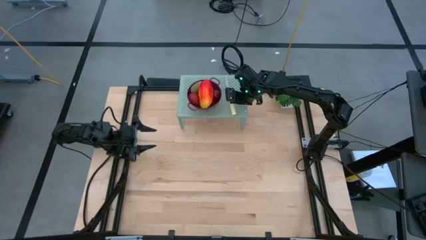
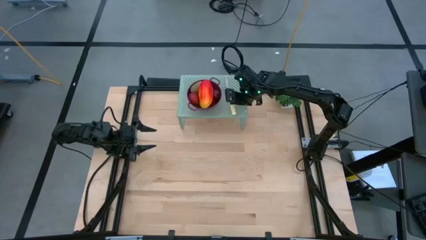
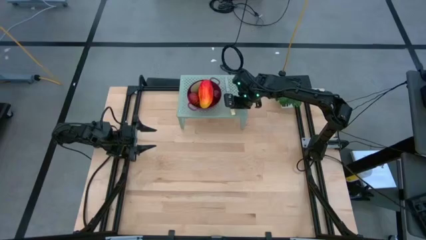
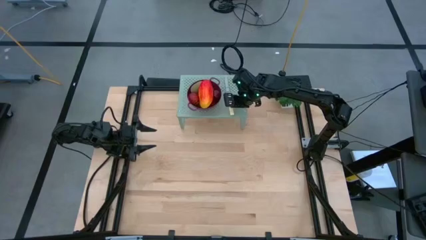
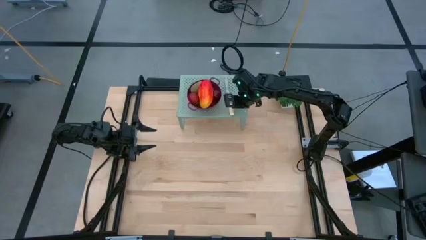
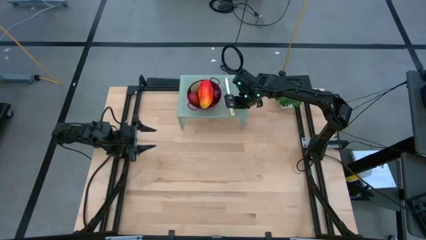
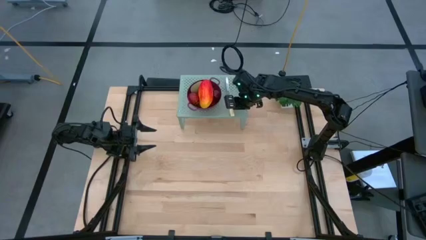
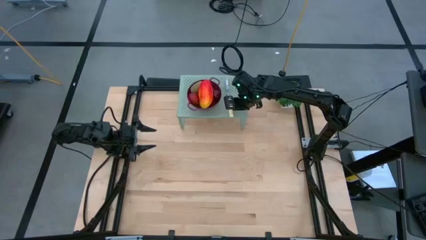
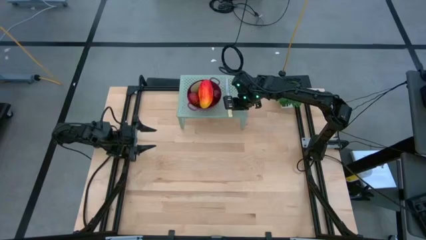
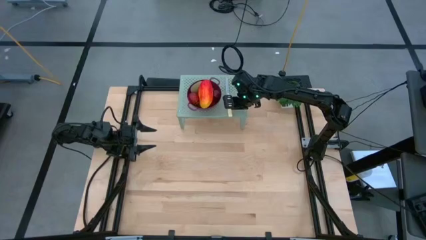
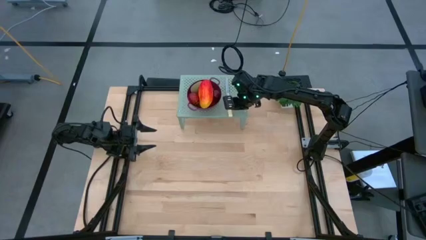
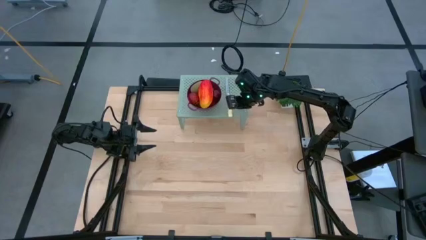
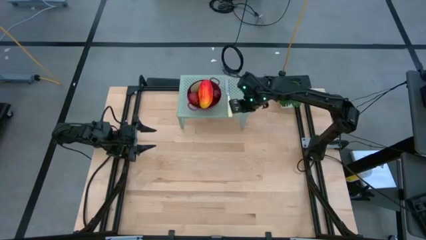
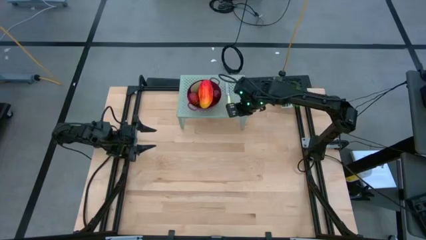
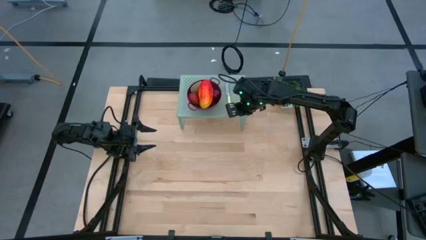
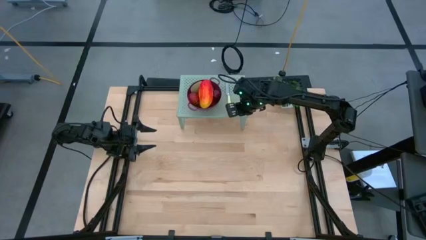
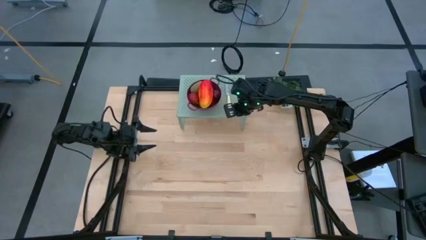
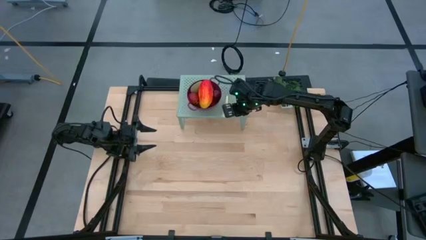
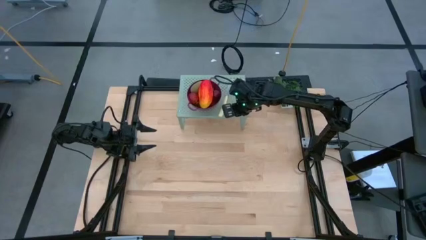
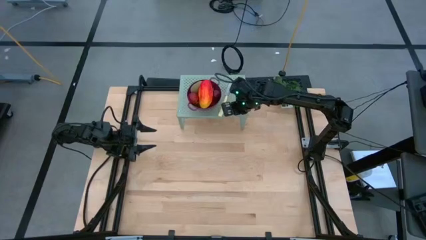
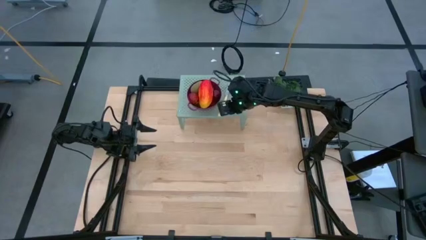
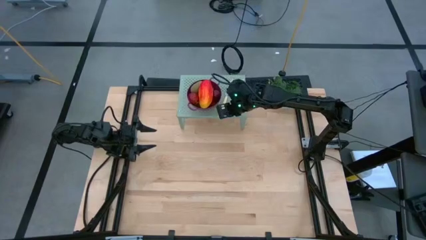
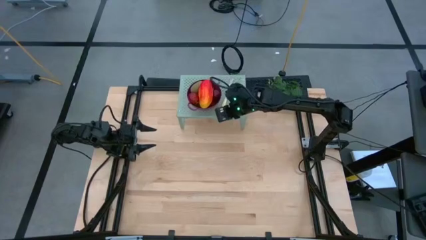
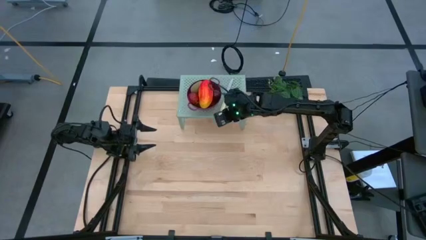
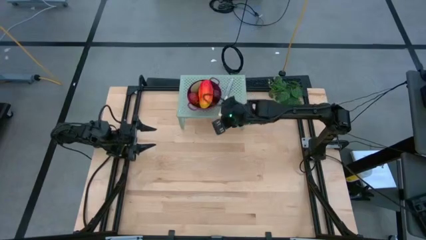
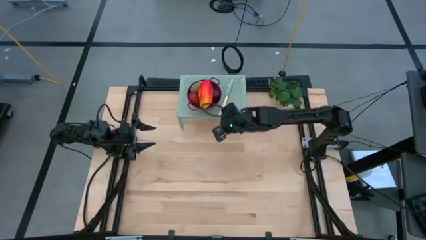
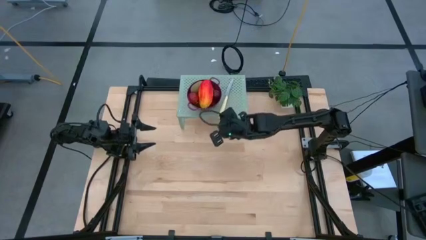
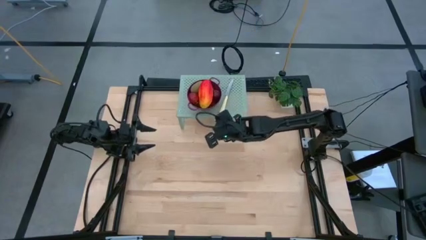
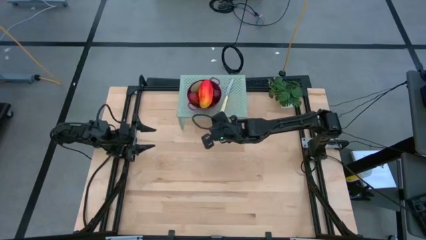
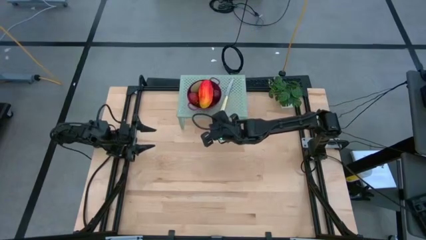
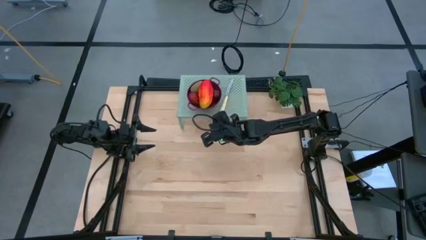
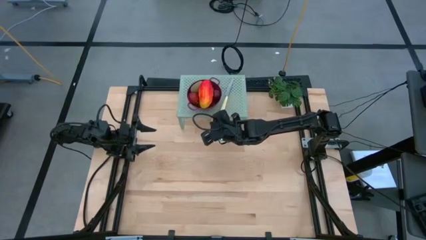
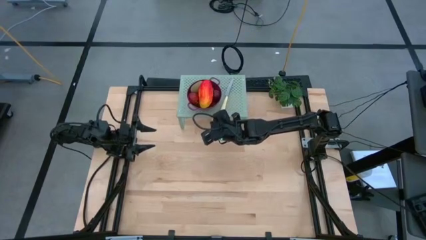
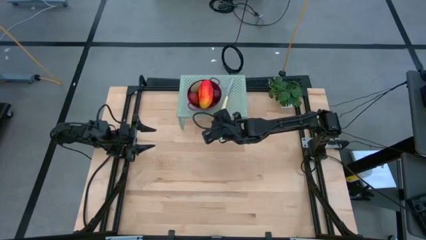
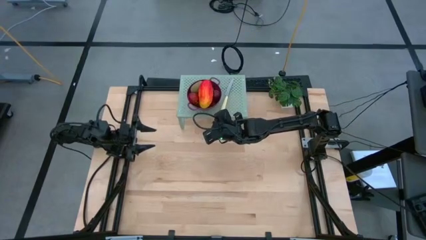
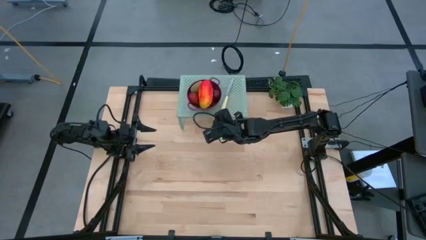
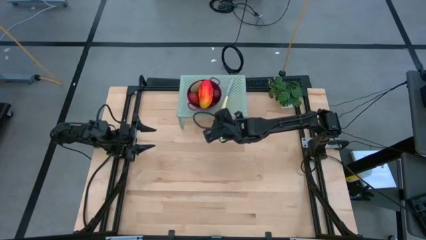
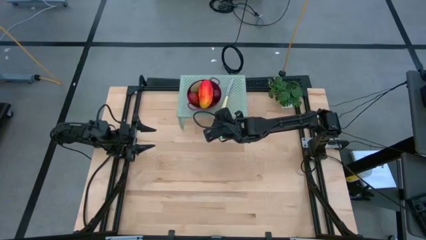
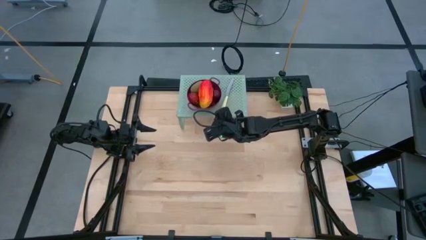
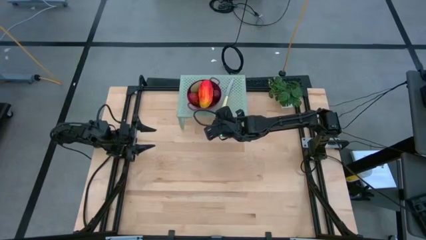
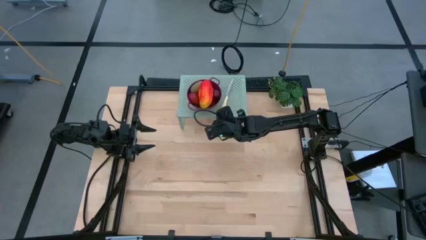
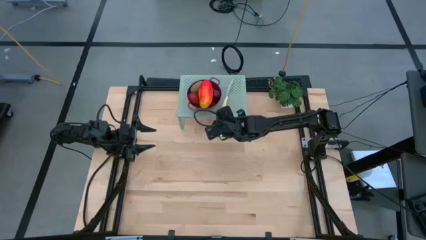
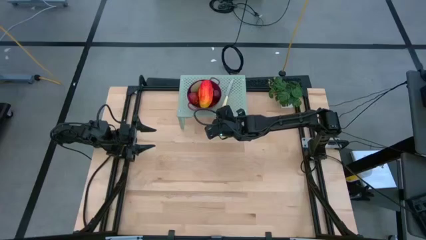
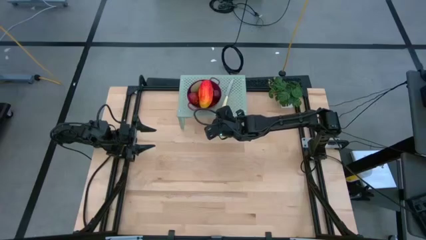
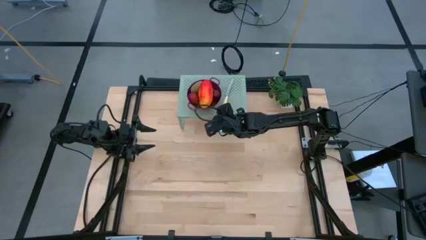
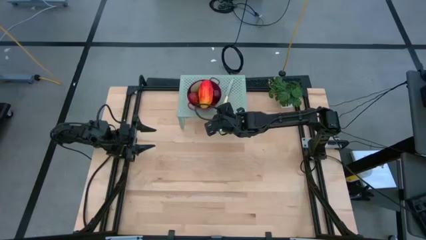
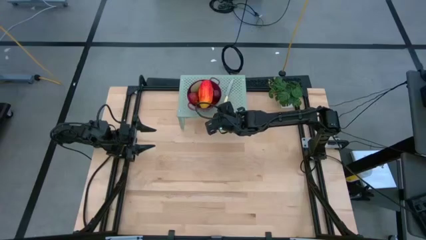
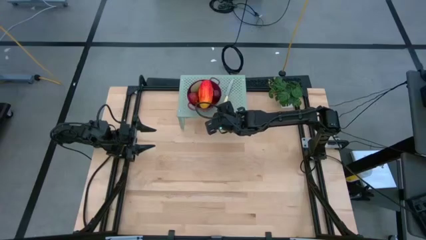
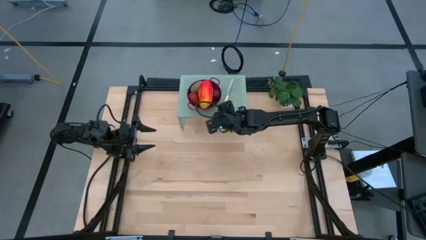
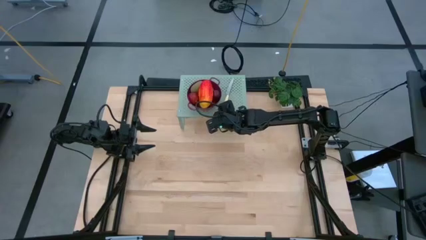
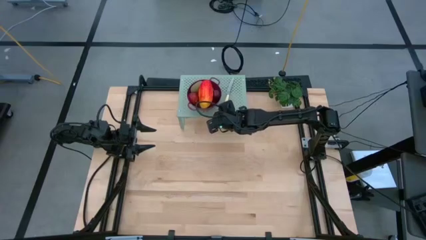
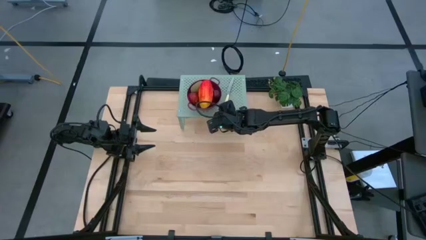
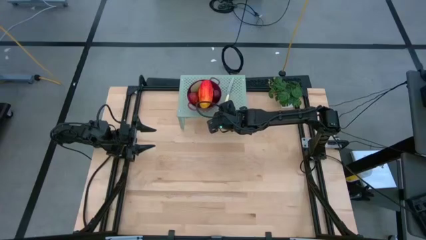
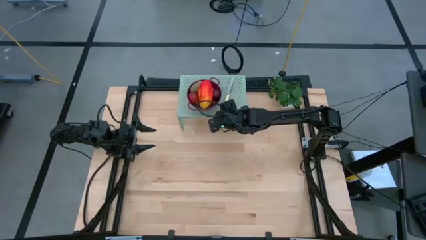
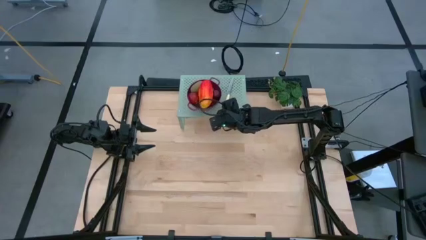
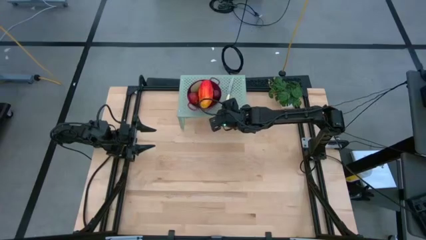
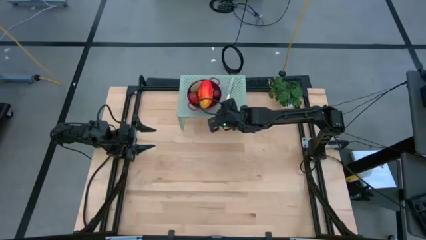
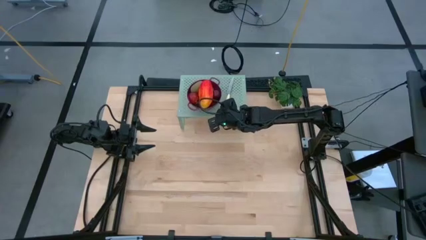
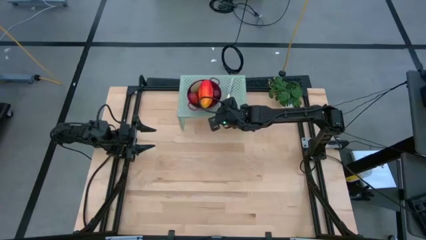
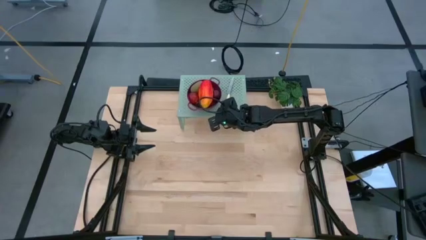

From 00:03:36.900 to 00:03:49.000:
Task: Pick & Place Fruit
Return to Home Position
